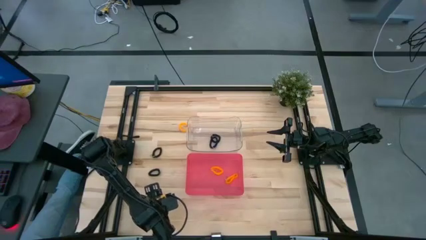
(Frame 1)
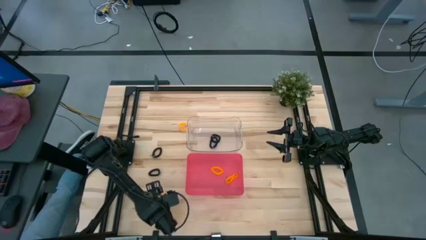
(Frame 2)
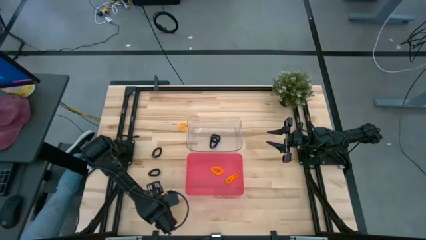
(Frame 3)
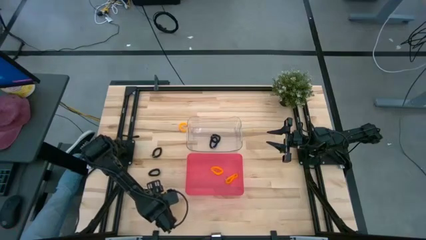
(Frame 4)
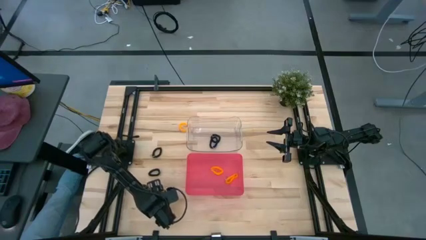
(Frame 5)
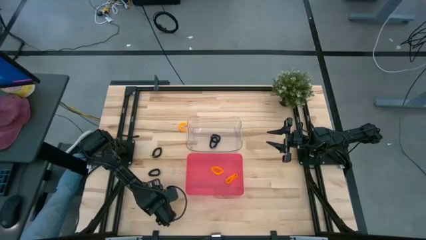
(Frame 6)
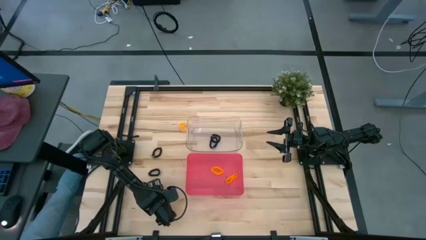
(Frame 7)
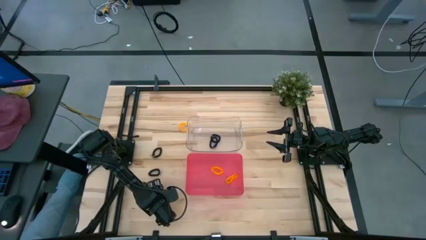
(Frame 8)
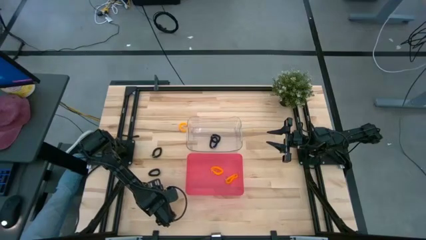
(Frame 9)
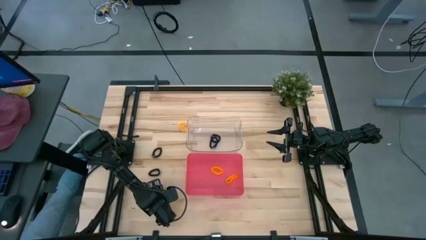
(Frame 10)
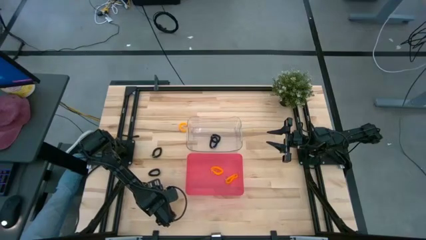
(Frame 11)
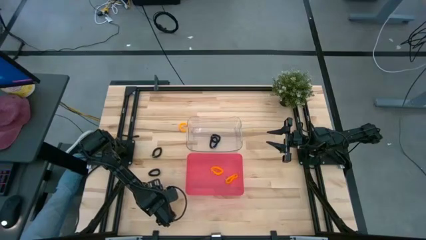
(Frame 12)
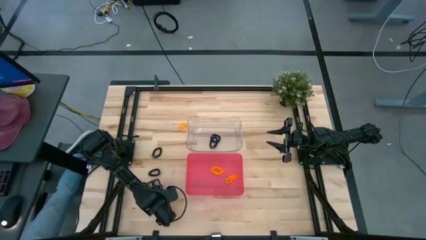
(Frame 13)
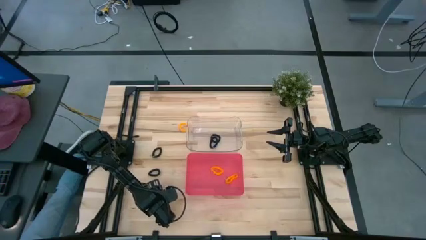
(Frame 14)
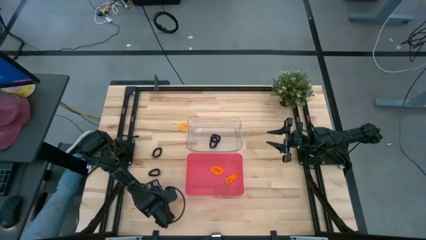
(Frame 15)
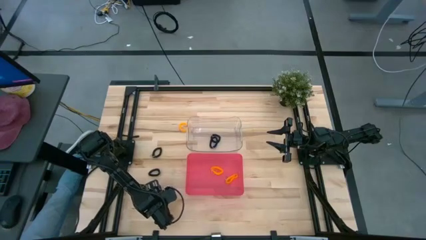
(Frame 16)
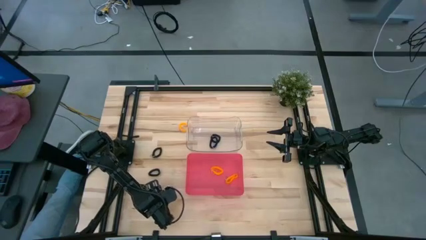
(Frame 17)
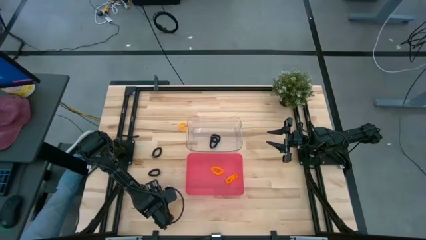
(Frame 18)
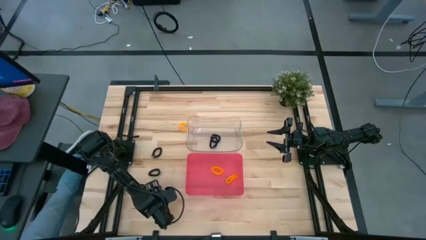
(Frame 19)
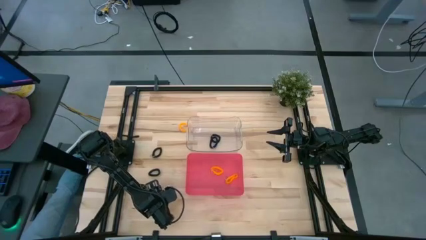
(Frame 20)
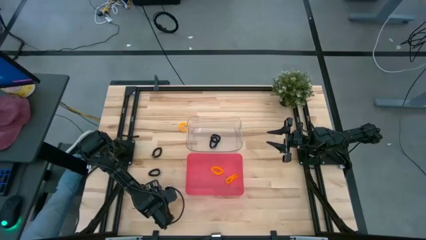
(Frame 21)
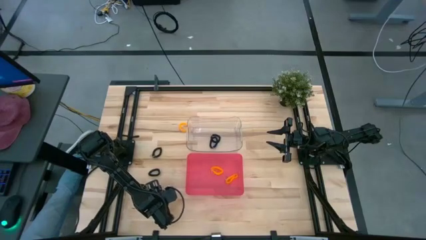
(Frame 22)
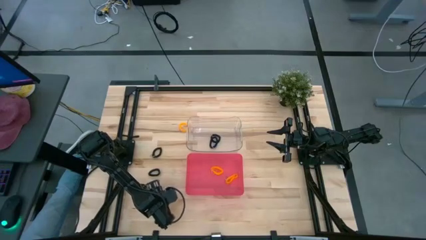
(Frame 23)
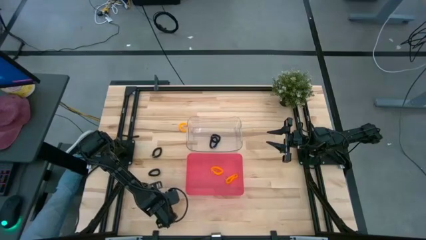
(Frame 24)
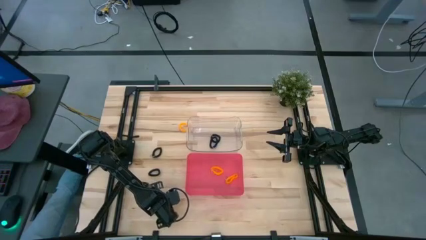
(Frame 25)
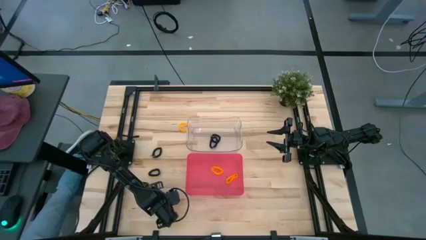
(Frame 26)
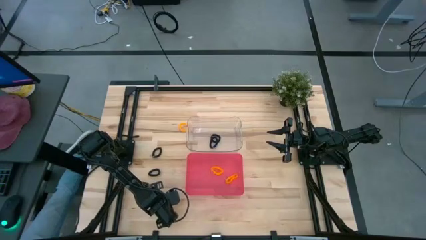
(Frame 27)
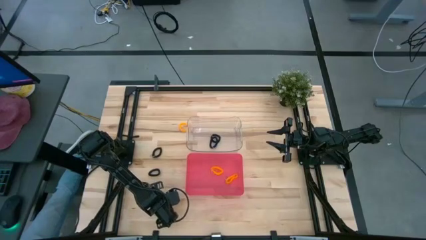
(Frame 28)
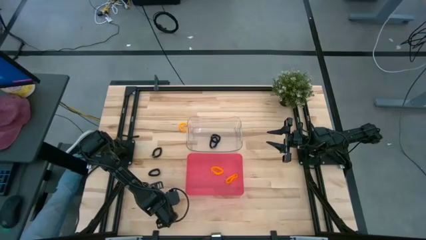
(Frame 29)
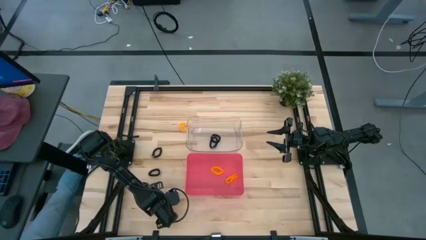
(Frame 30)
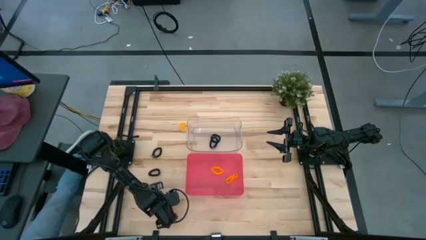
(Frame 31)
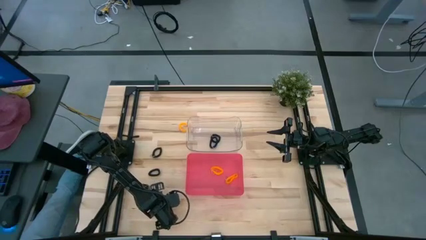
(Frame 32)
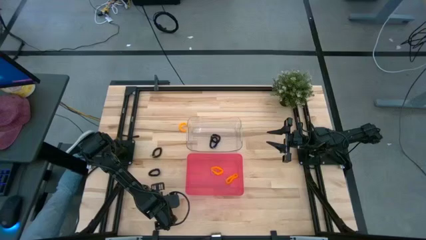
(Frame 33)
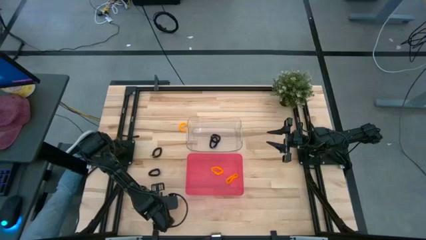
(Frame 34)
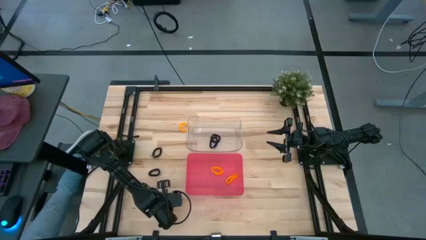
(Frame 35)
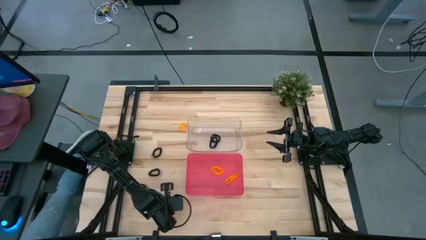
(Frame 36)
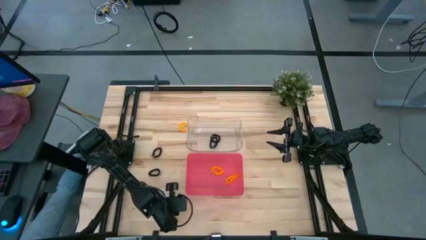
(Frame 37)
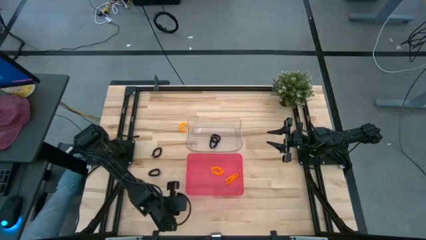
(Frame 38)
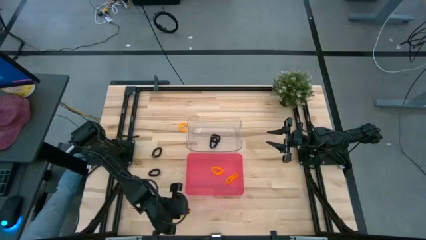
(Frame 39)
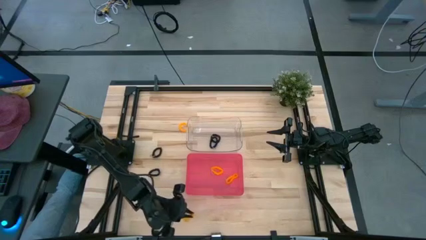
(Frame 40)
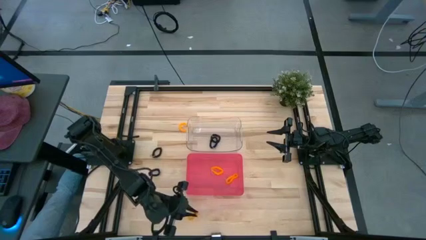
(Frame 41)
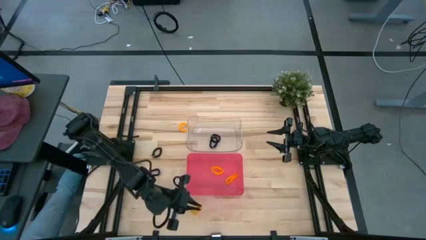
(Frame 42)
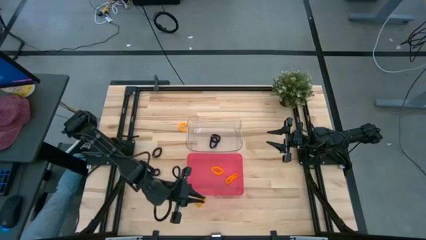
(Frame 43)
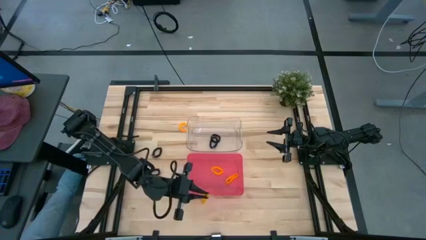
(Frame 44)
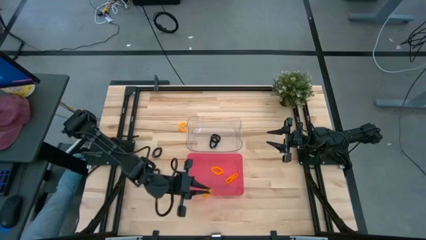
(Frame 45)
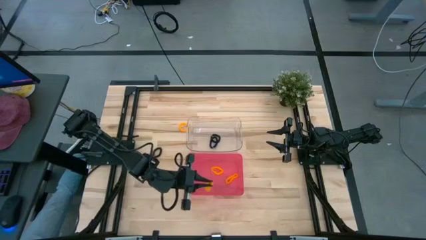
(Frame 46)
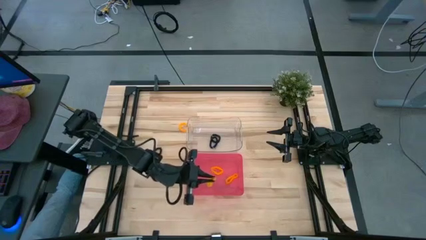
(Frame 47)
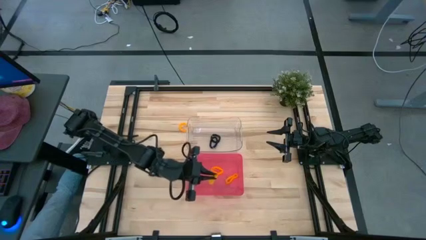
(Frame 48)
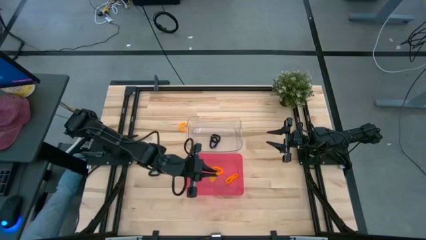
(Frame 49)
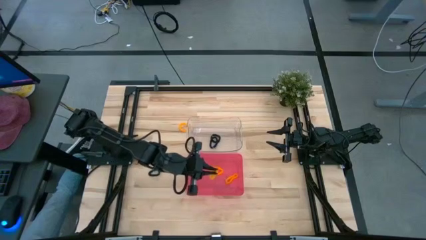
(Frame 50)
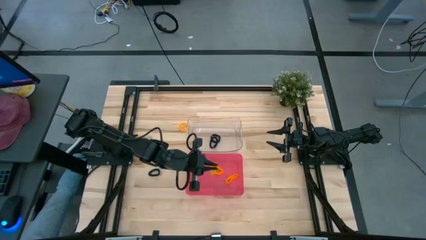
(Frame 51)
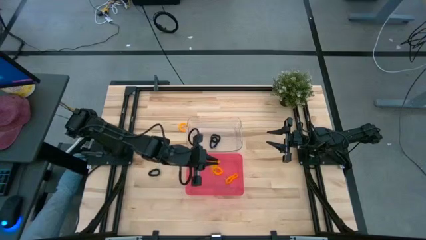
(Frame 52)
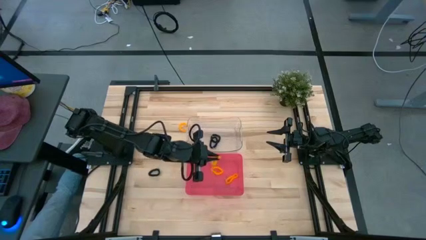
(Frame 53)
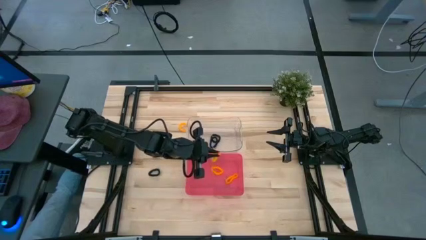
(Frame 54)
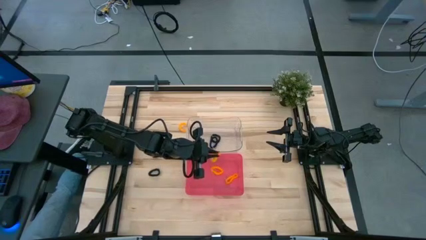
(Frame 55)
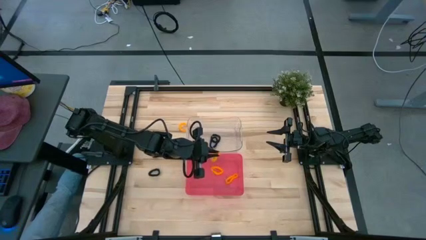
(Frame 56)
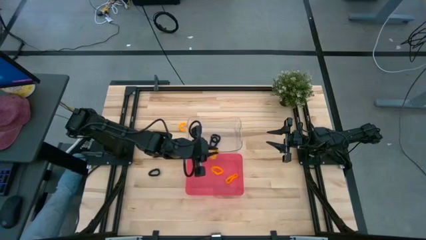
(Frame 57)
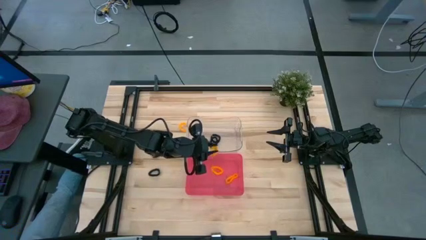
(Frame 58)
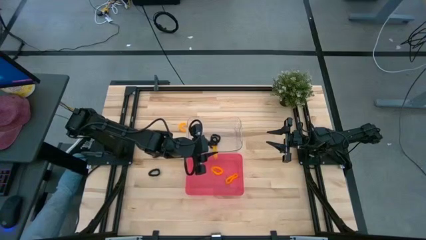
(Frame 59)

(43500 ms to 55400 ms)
Task: Sort spring keychains
Put the yellow spring keychain into the red bin

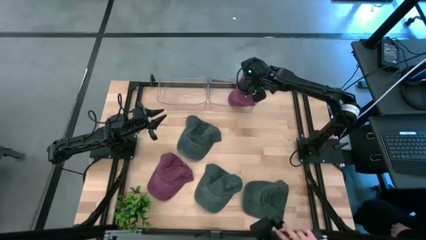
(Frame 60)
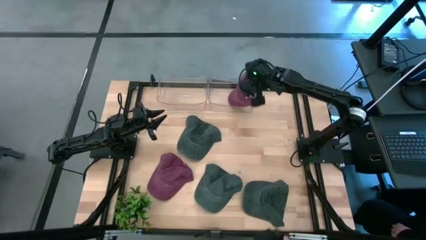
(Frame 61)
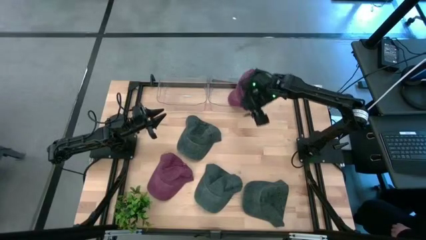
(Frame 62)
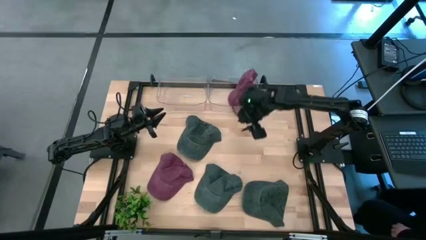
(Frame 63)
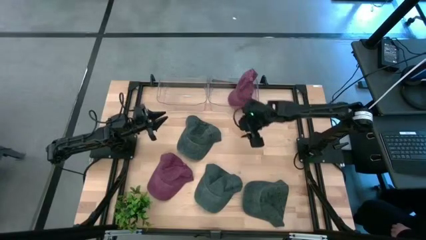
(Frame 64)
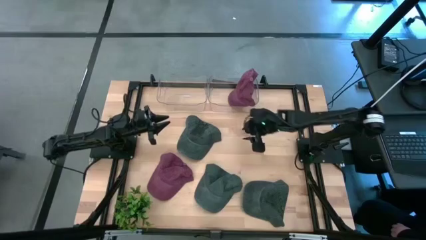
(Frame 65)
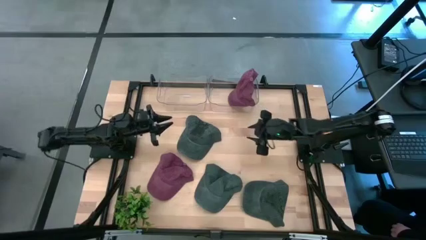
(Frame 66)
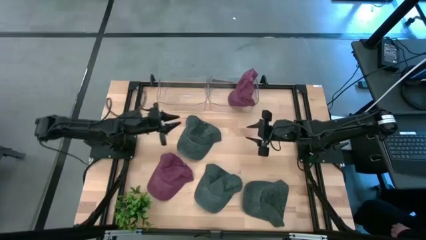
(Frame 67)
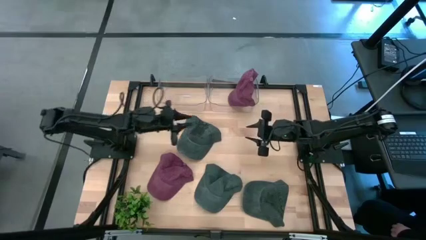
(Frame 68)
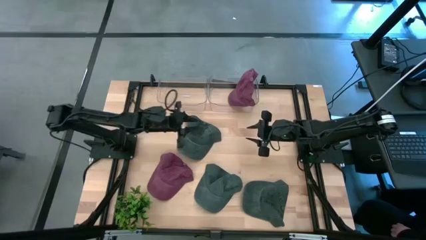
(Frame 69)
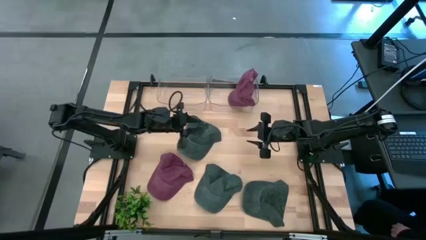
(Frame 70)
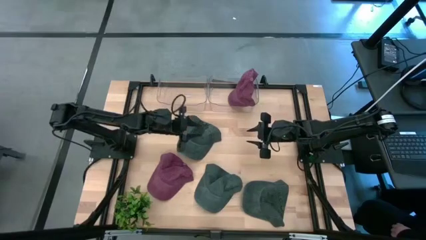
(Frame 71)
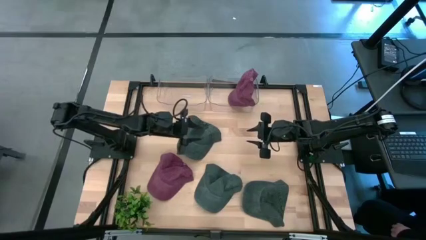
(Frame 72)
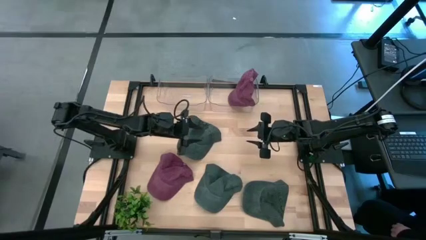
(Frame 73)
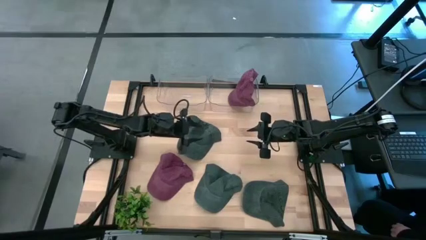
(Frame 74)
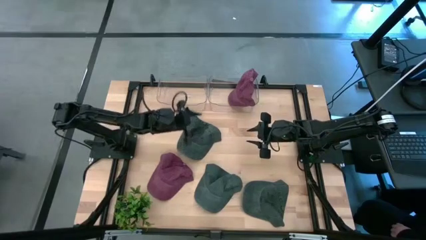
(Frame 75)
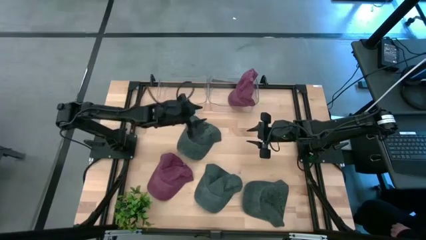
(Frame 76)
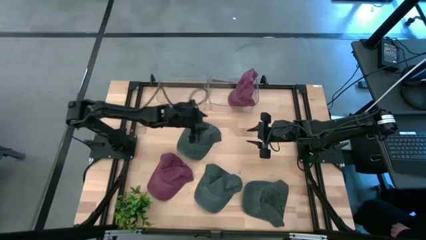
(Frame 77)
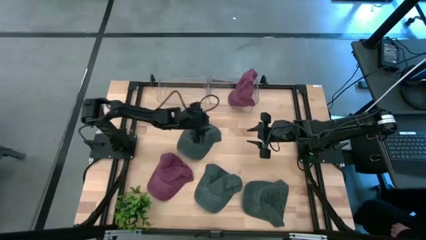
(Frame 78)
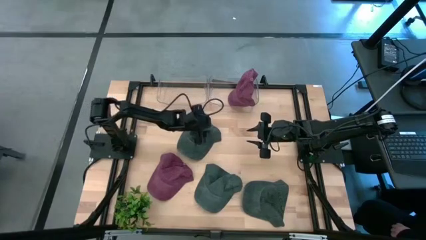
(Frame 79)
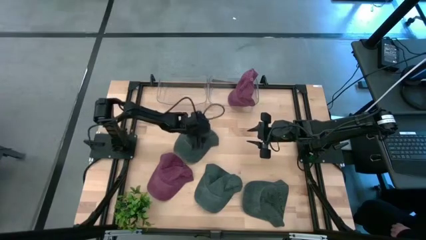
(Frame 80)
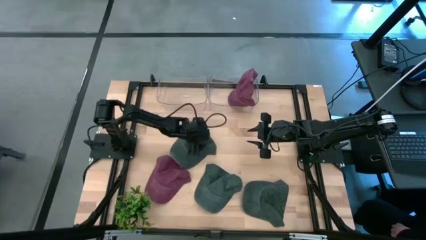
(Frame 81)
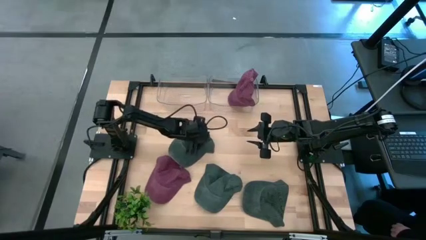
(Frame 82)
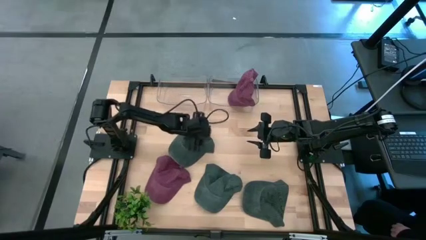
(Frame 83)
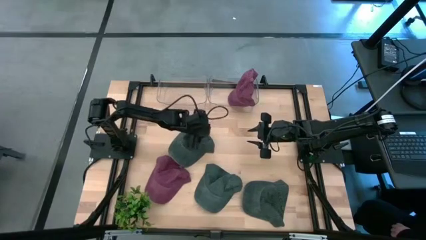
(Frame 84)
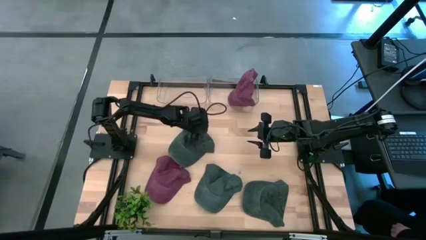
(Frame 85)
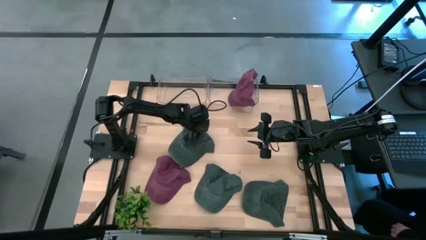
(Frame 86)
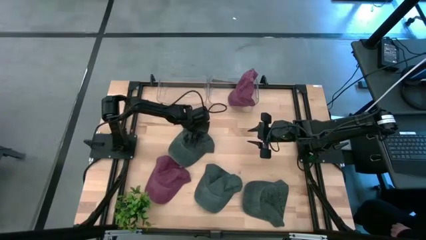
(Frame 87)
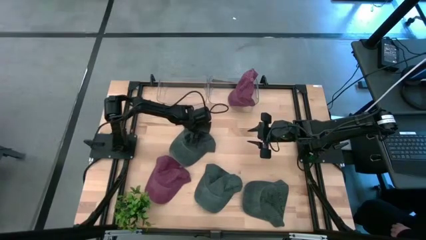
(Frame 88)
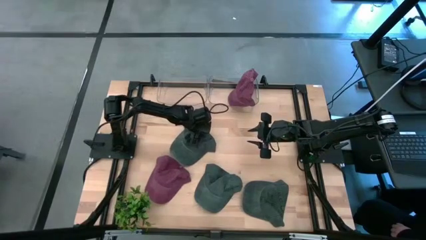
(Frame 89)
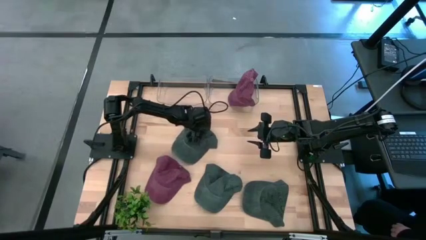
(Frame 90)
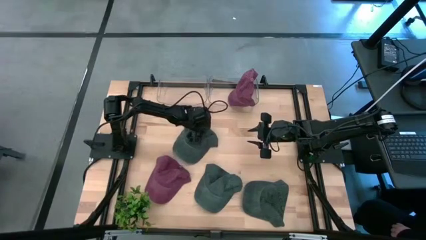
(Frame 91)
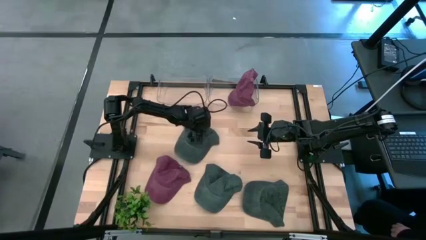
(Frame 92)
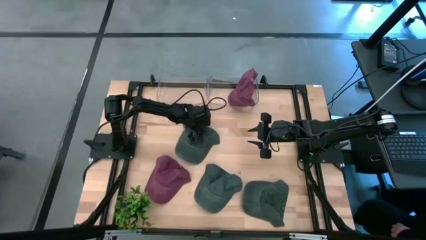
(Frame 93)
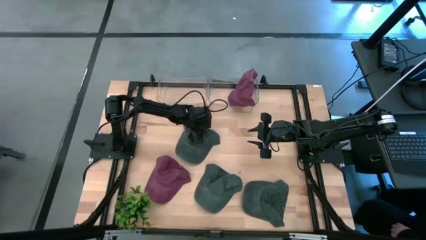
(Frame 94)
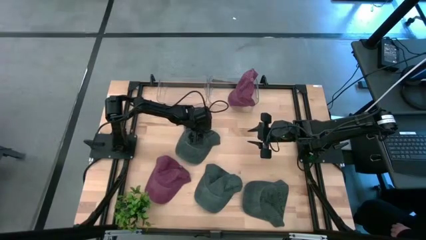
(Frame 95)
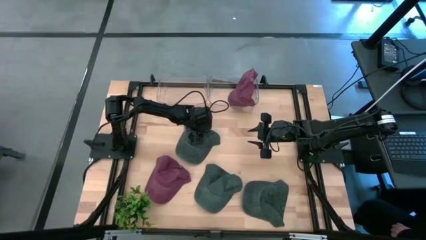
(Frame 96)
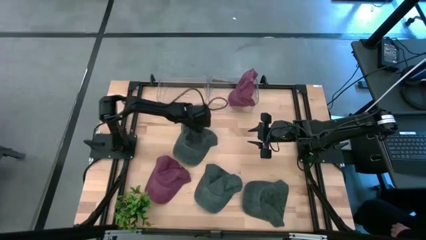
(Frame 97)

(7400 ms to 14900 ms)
Task: Pick & Place hat
Put the top left black cap into the left transparent bin
